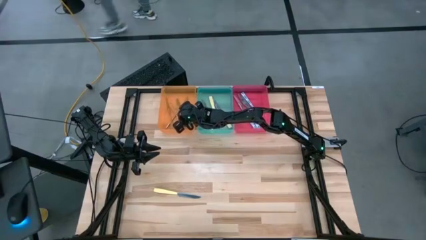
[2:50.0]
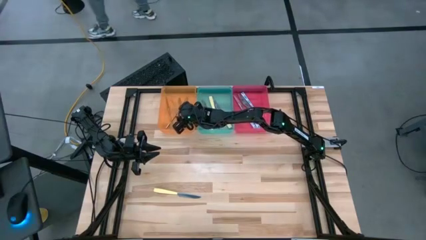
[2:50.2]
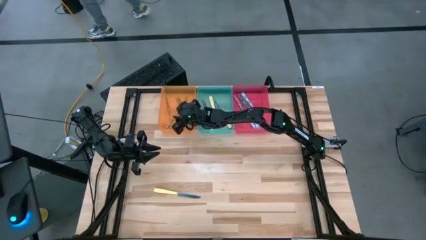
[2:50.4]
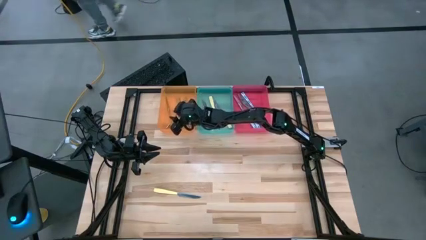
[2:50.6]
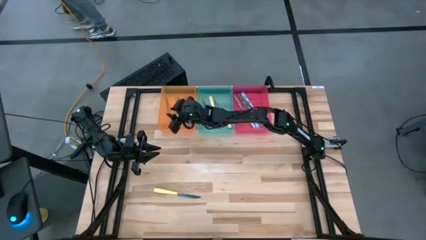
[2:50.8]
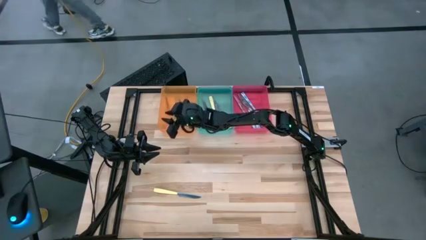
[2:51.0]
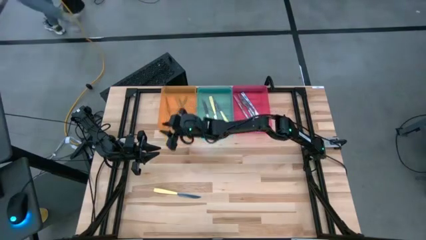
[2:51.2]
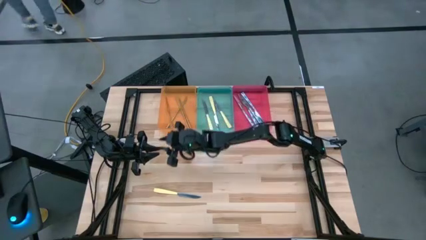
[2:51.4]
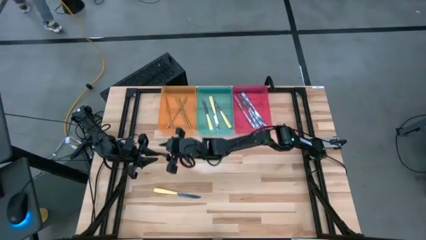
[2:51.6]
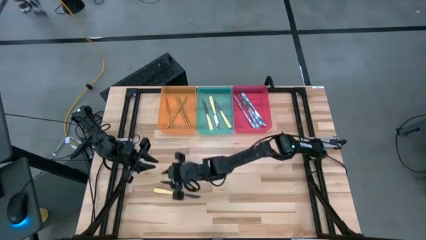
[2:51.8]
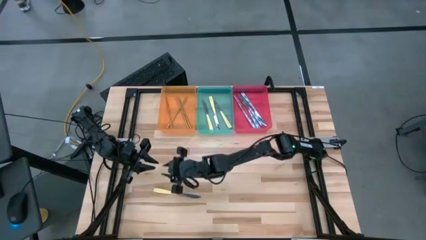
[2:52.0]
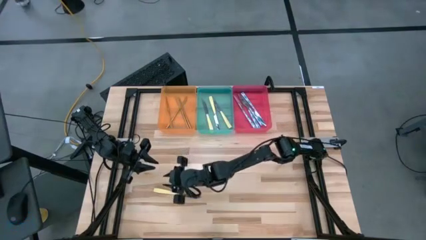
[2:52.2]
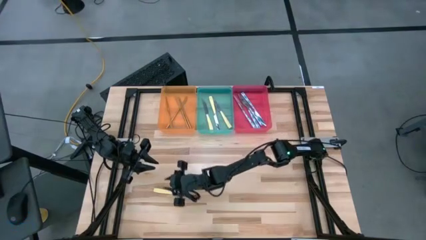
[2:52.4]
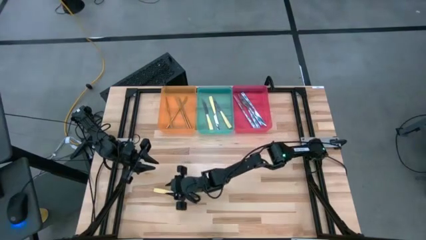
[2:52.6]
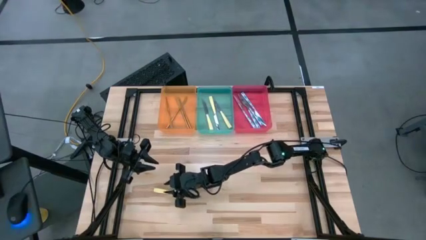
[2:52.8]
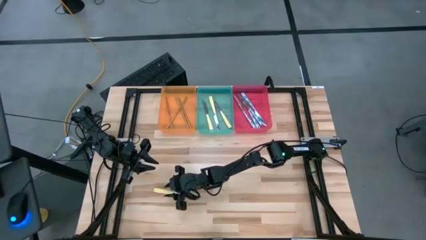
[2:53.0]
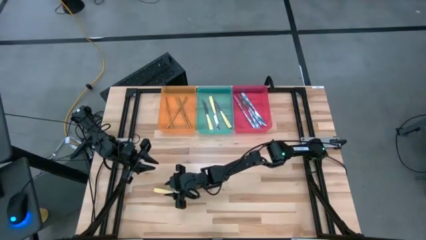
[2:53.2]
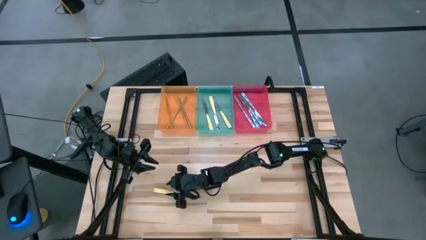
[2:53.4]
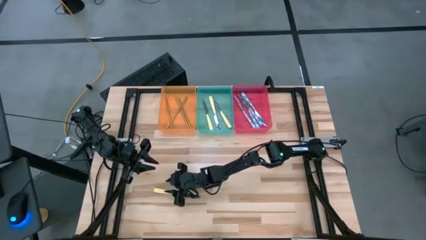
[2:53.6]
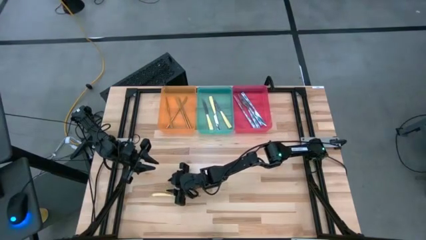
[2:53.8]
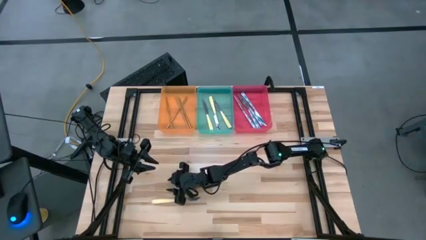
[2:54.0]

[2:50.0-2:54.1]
Task: Sort silverware by color (type)
Put the yellow table knife into the blue bin

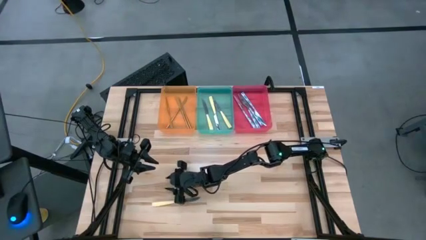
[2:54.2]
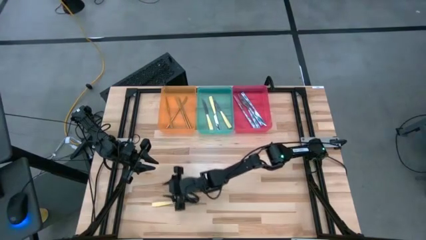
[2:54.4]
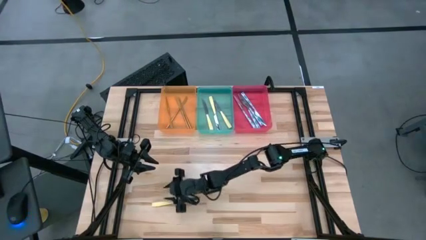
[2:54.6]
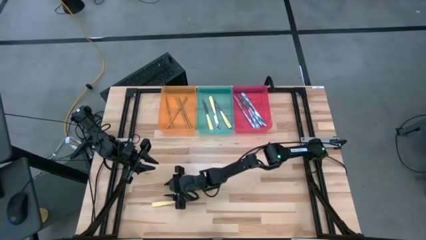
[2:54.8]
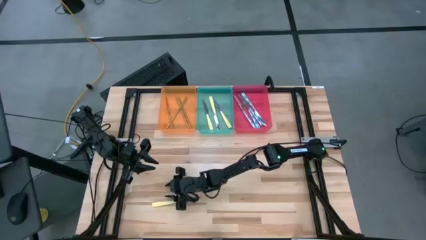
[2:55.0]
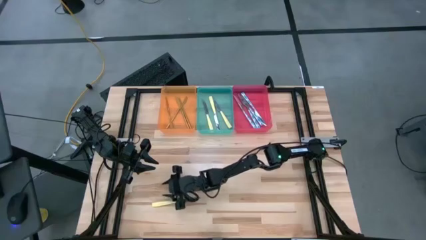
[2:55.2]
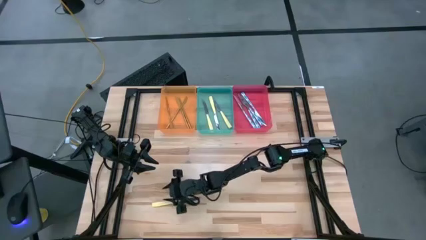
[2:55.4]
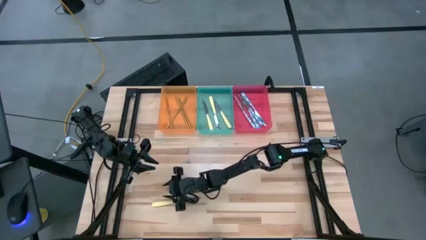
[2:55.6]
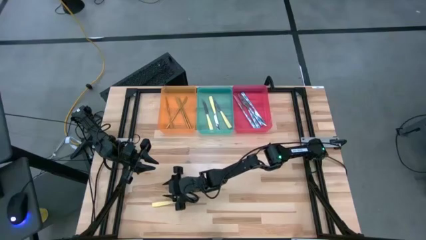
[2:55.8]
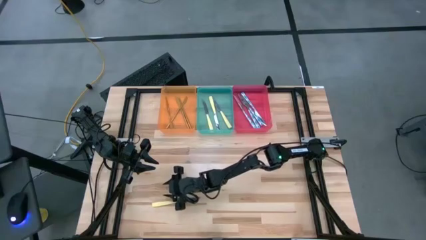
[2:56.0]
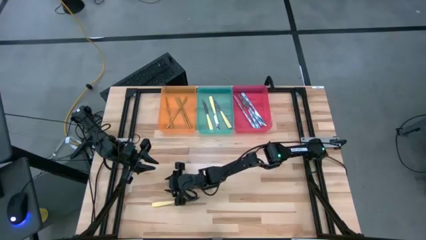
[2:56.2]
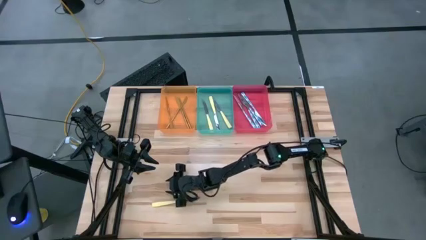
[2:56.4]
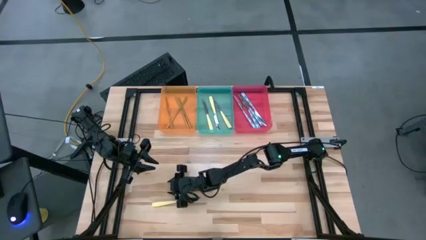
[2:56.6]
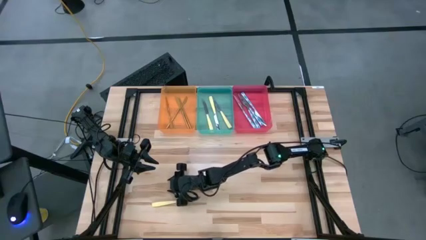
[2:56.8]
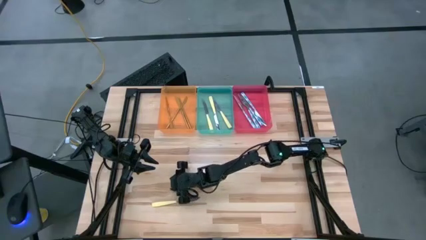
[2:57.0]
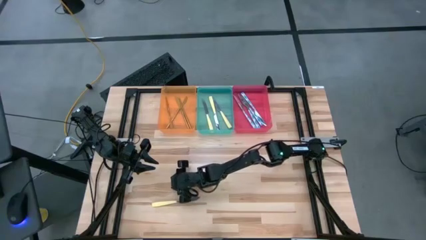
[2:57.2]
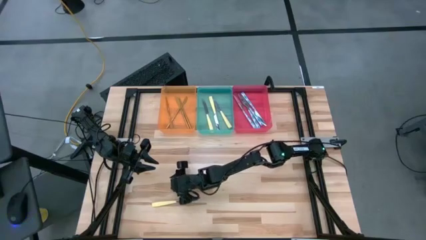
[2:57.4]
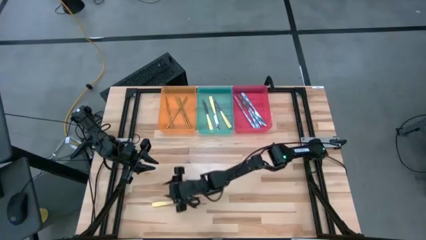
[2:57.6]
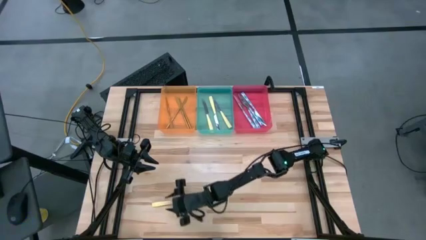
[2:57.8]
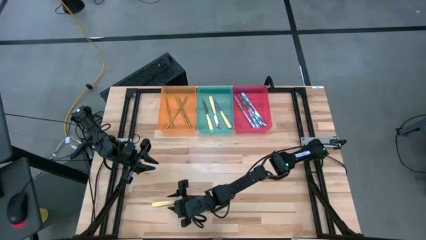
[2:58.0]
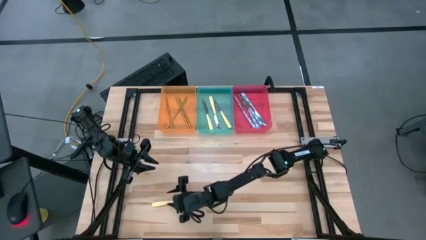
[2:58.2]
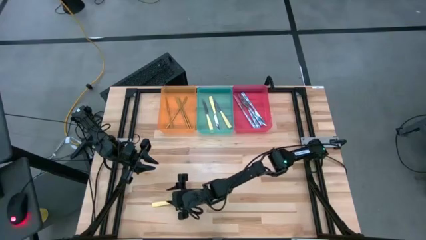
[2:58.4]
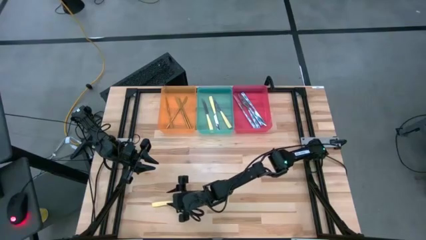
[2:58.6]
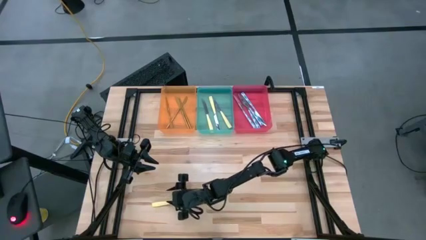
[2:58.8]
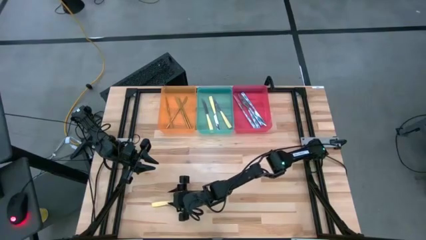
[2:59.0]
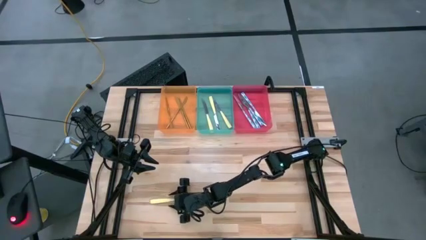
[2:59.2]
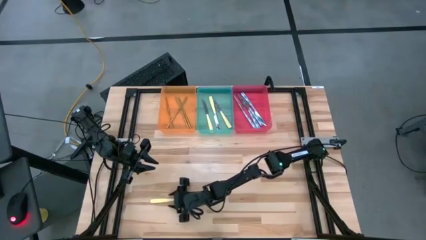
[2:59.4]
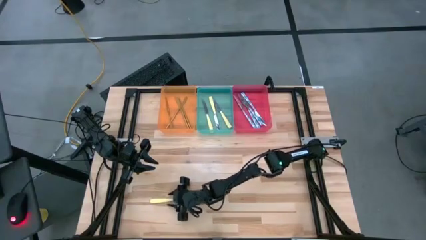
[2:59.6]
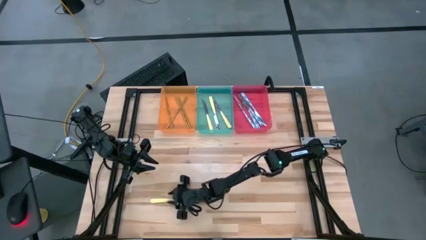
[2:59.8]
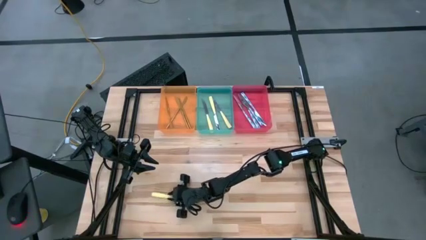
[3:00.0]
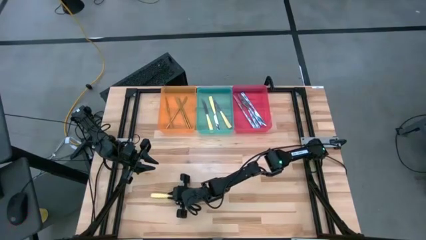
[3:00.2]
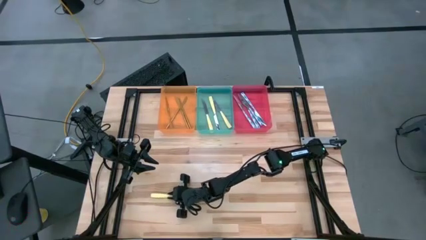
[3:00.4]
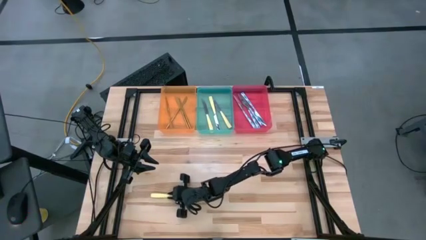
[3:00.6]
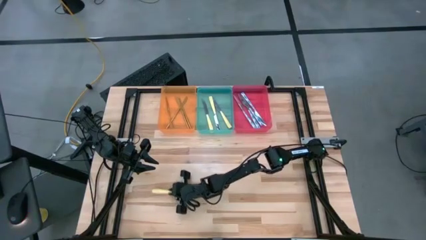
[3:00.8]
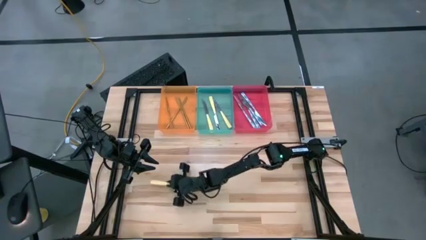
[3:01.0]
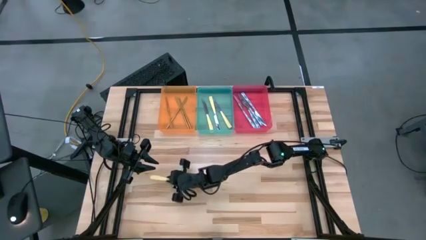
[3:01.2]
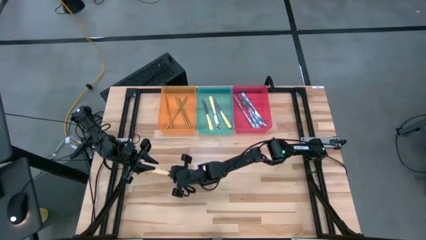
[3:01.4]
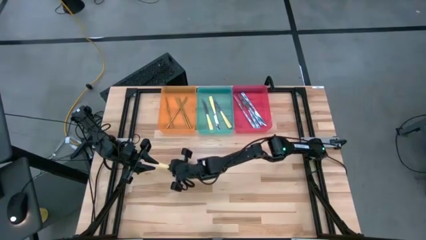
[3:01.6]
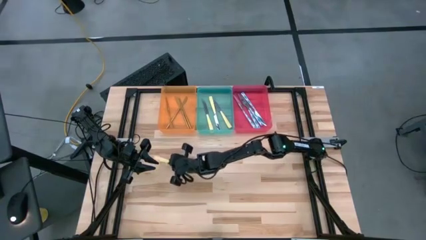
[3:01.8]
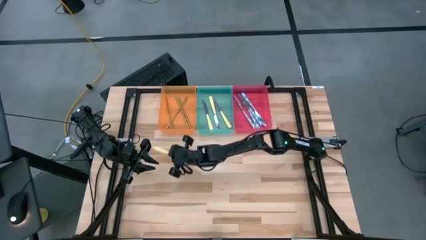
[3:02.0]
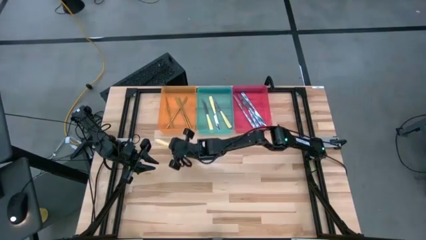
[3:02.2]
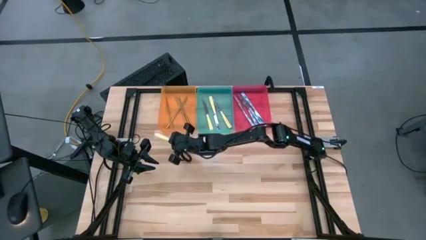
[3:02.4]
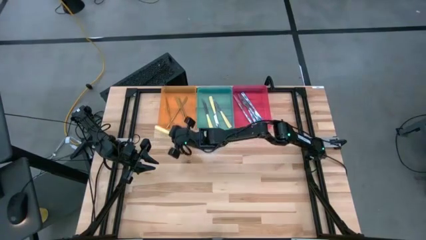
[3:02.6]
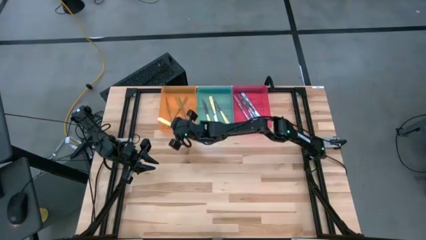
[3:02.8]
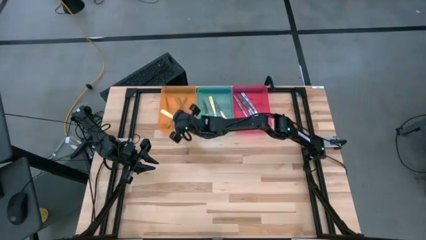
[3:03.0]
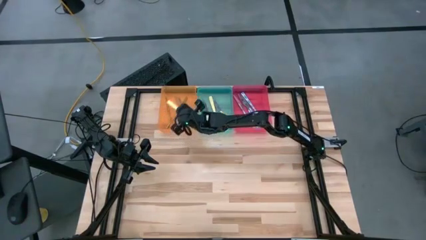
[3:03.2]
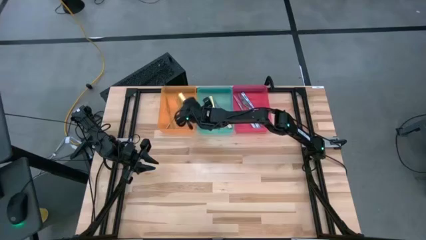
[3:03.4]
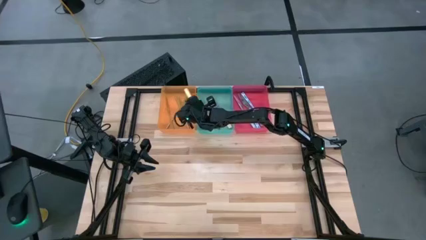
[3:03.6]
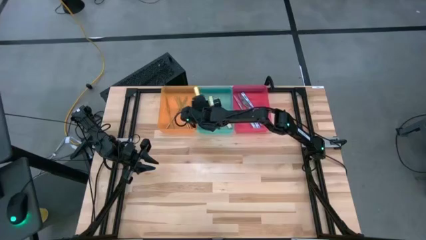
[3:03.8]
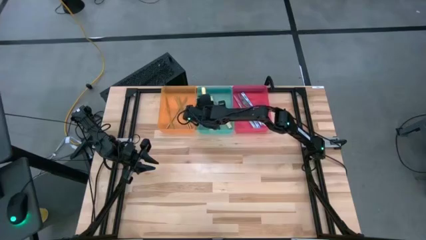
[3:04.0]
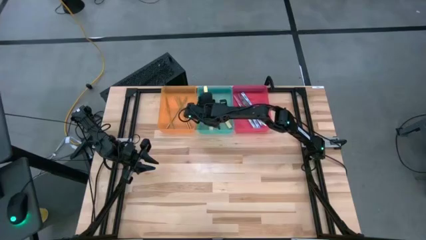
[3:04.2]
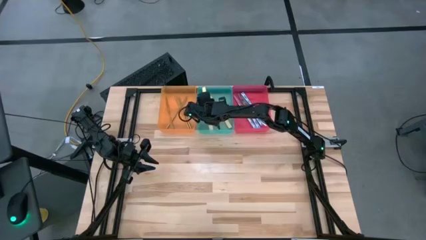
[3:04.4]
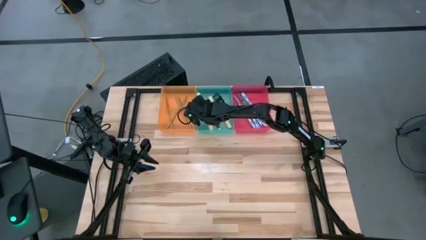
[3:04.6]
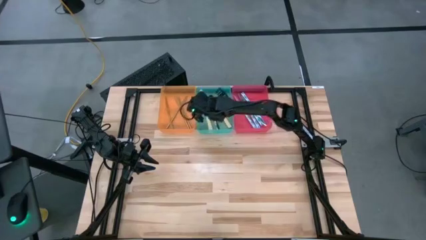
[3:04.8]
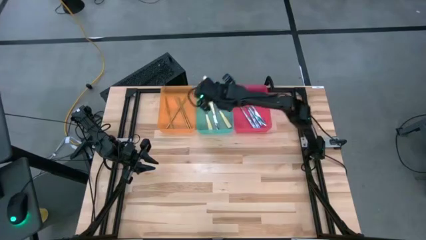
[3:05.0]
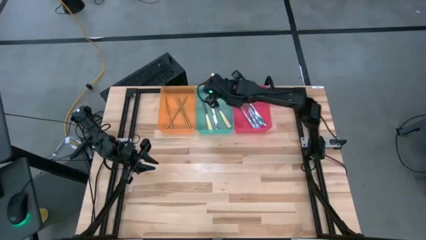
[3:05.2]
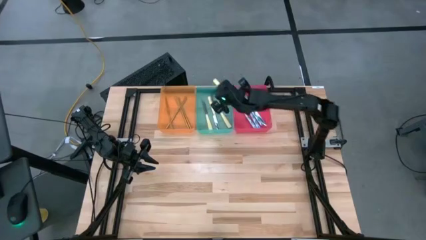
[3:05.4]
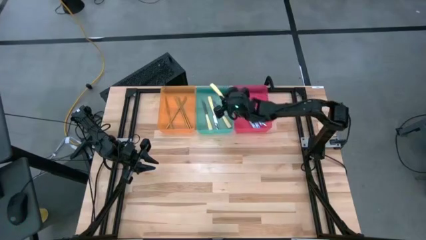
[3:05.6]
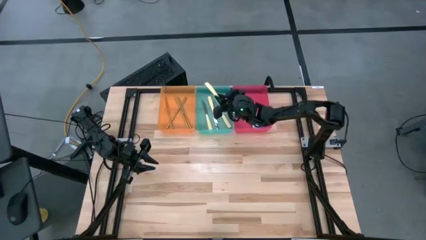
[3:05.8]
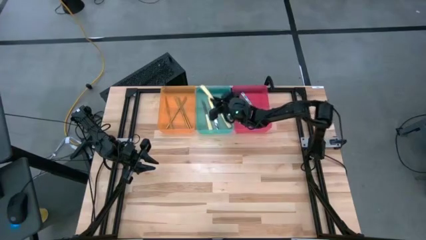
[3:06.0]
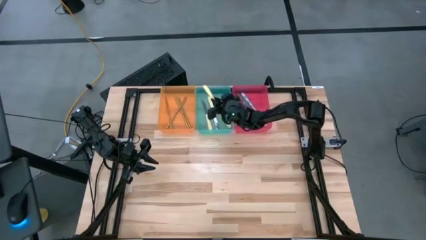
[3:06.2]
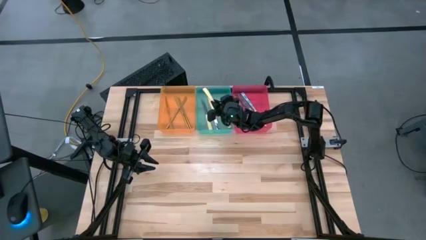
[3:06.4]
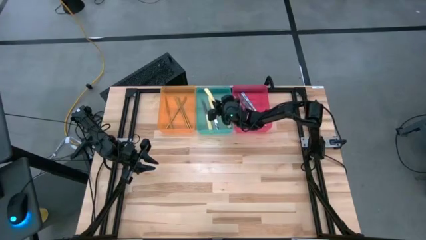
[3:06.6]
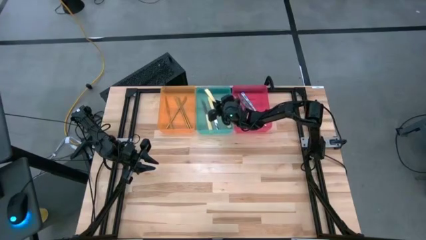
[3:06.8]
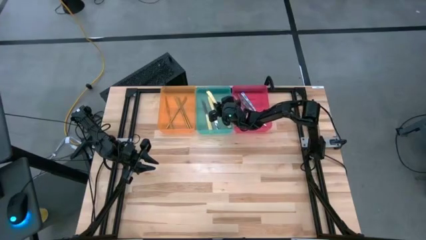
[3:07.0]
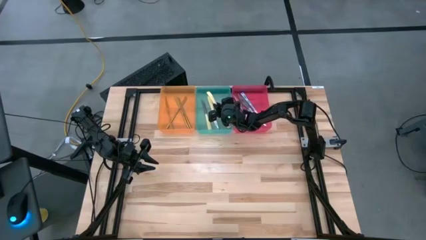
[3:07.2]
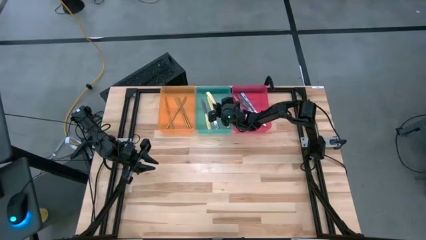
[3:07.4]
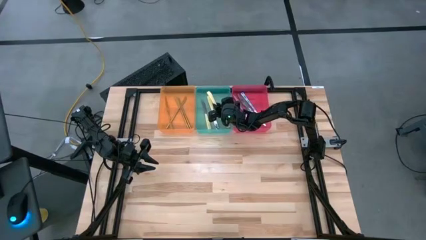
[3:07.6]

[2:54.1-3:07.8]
Put the yellow table knife into the blue bin
